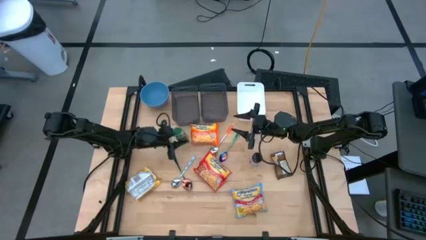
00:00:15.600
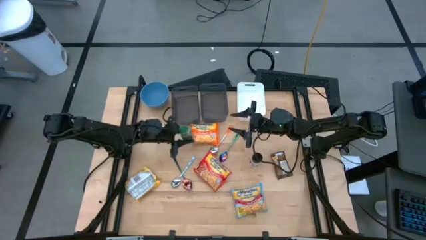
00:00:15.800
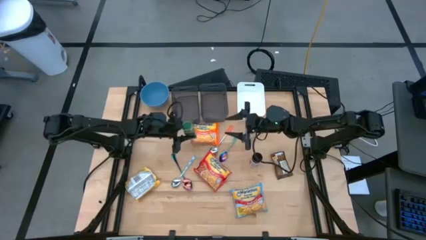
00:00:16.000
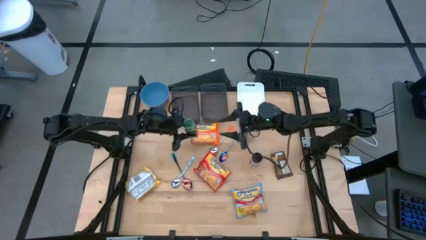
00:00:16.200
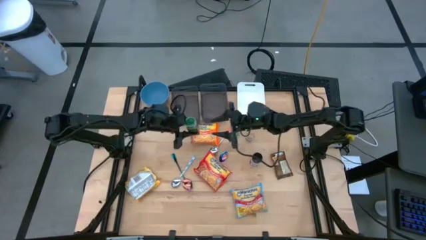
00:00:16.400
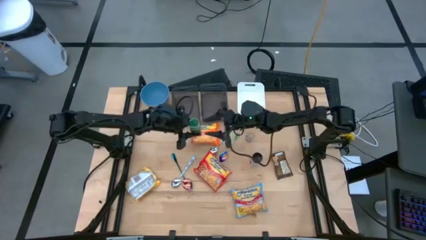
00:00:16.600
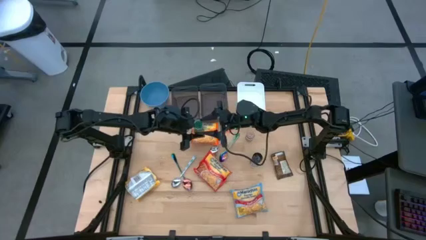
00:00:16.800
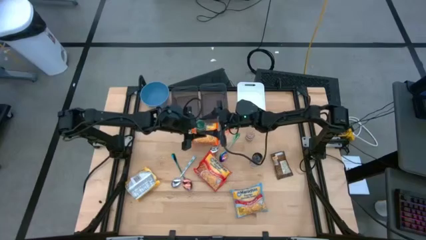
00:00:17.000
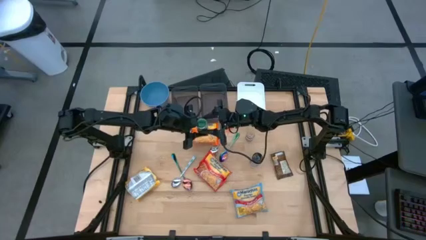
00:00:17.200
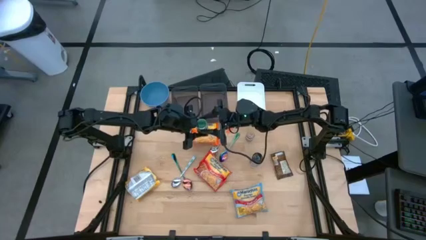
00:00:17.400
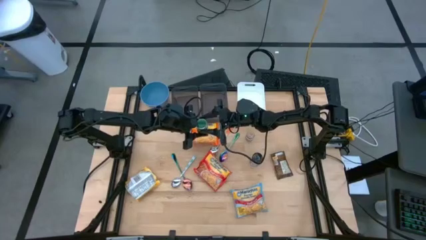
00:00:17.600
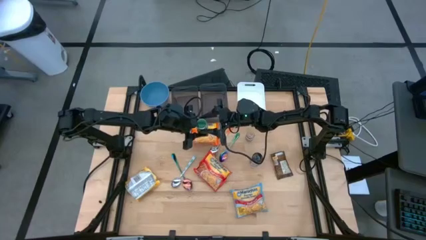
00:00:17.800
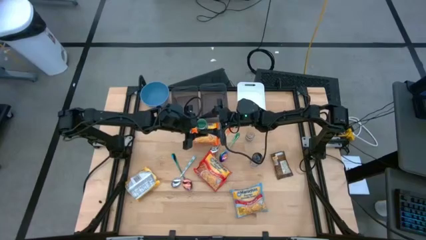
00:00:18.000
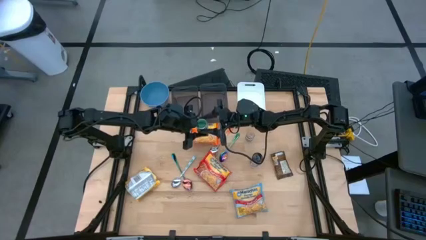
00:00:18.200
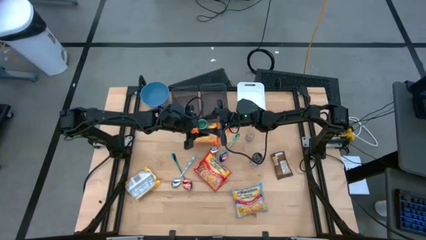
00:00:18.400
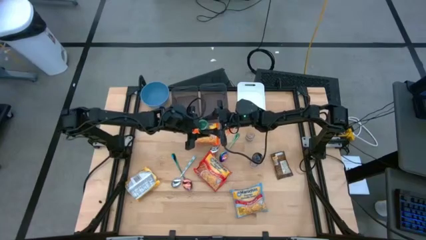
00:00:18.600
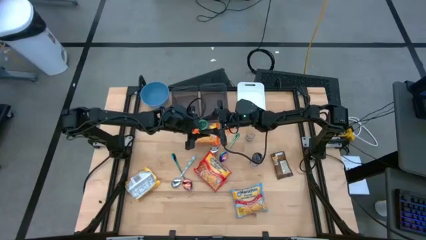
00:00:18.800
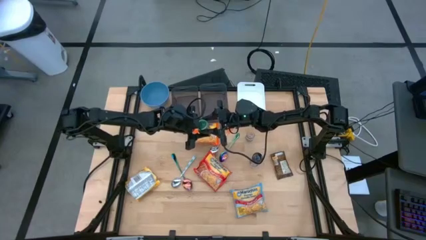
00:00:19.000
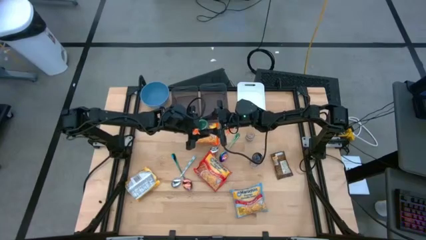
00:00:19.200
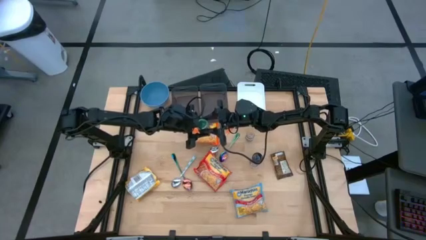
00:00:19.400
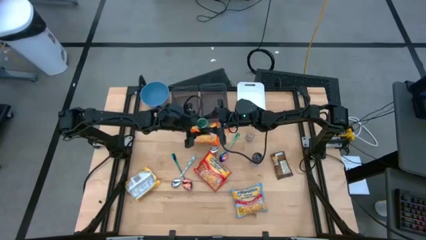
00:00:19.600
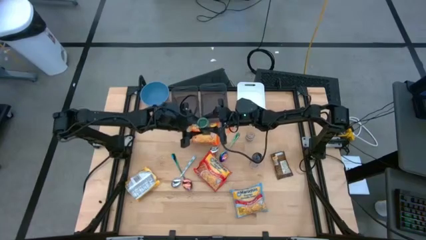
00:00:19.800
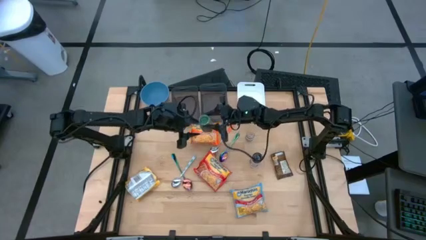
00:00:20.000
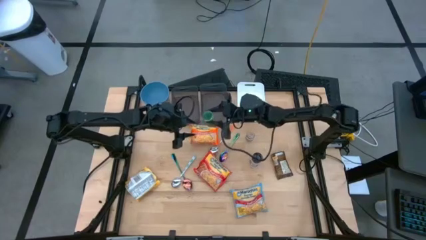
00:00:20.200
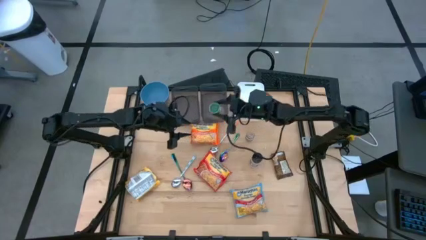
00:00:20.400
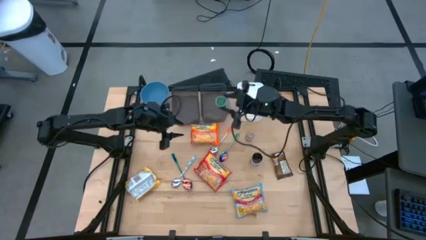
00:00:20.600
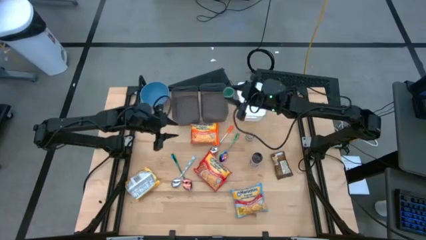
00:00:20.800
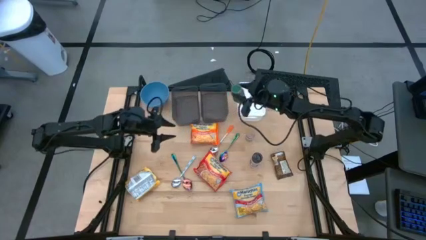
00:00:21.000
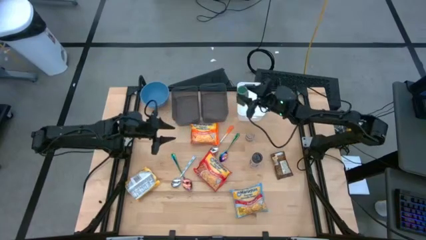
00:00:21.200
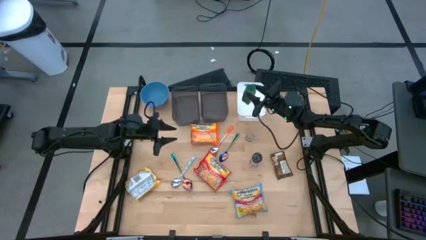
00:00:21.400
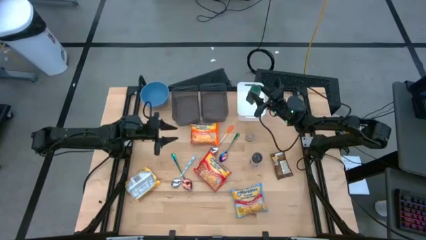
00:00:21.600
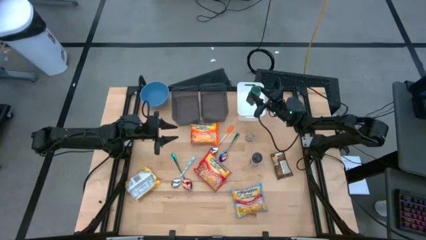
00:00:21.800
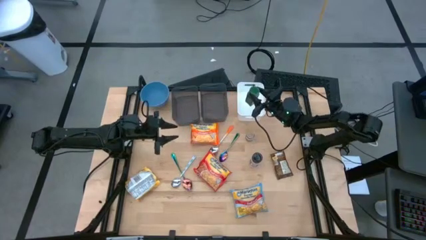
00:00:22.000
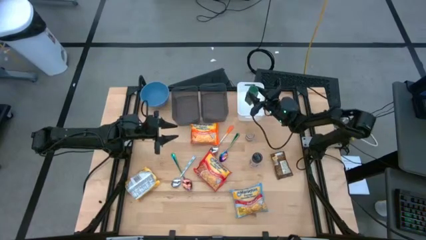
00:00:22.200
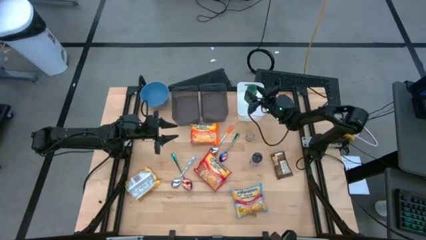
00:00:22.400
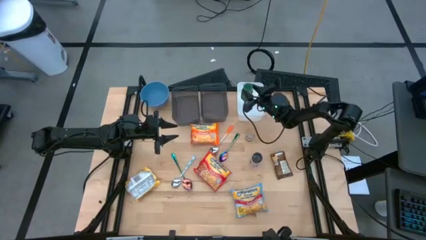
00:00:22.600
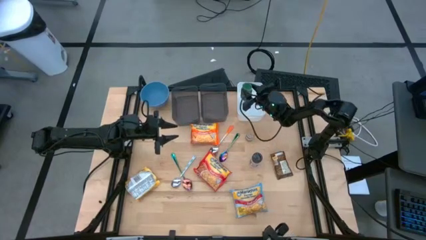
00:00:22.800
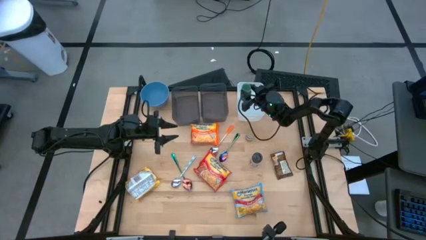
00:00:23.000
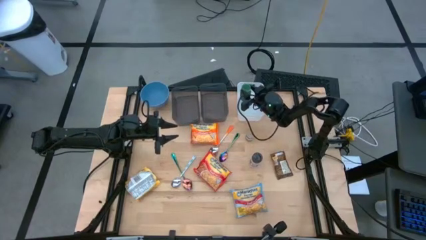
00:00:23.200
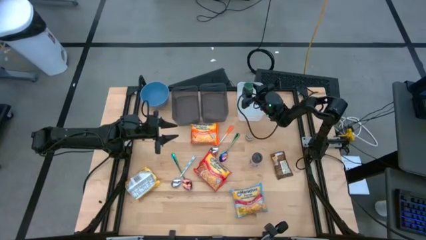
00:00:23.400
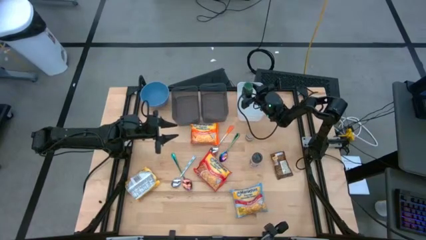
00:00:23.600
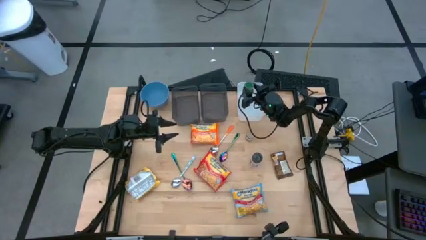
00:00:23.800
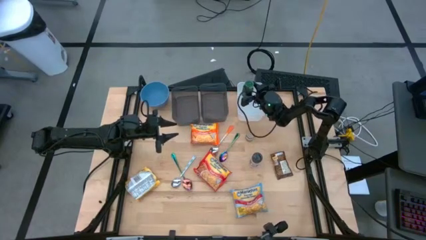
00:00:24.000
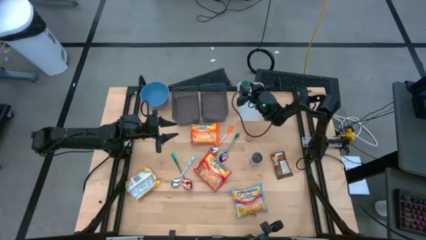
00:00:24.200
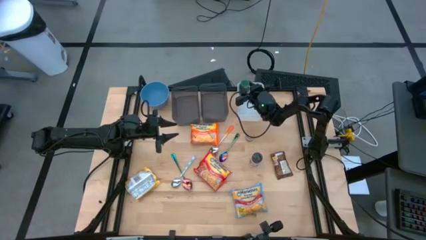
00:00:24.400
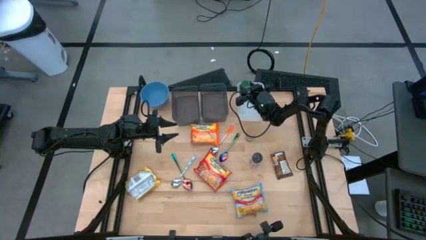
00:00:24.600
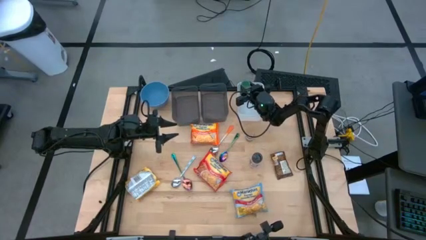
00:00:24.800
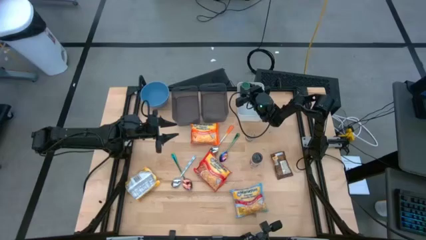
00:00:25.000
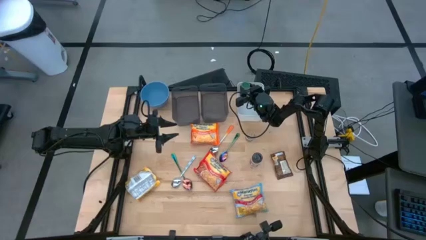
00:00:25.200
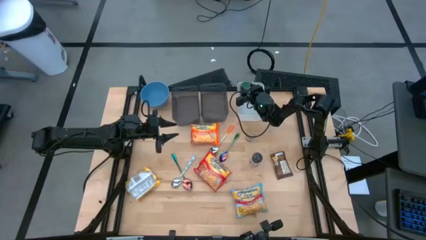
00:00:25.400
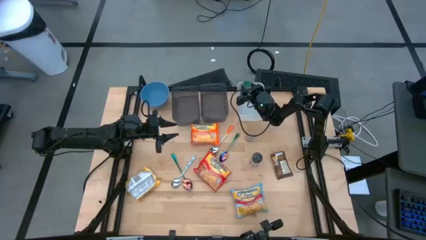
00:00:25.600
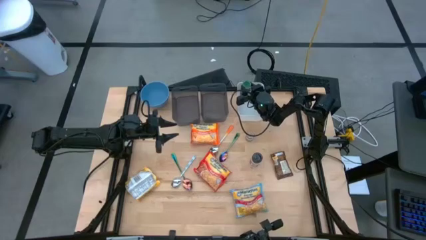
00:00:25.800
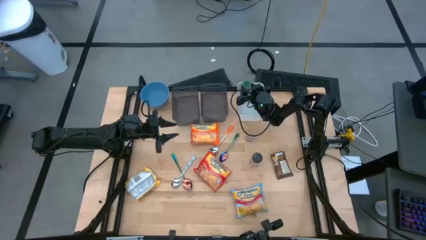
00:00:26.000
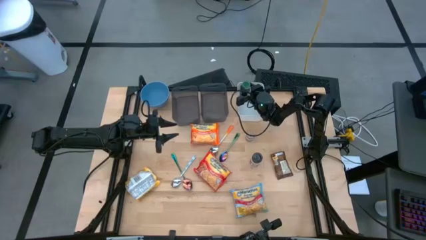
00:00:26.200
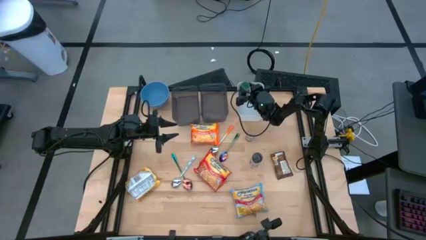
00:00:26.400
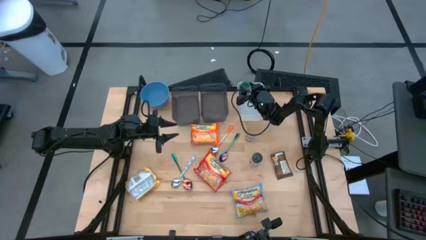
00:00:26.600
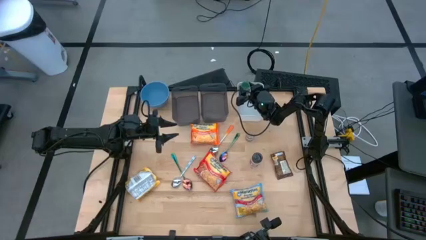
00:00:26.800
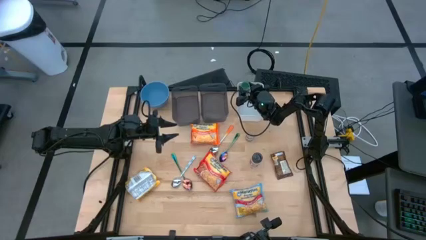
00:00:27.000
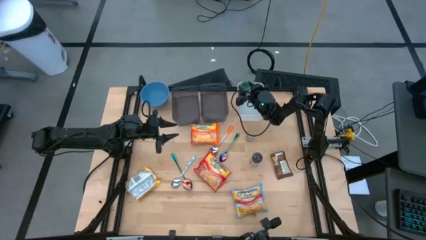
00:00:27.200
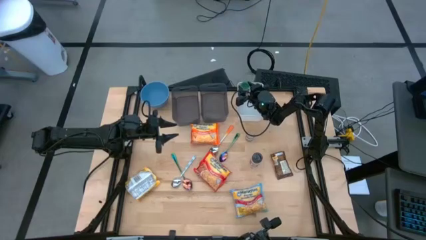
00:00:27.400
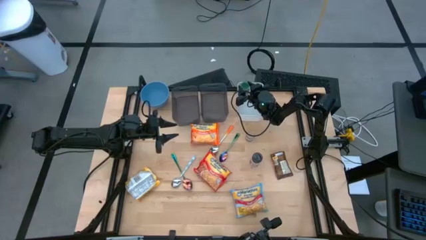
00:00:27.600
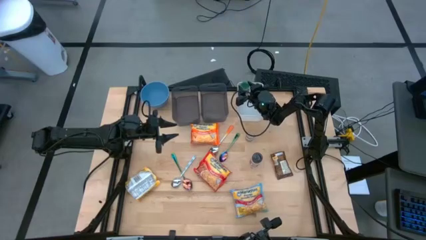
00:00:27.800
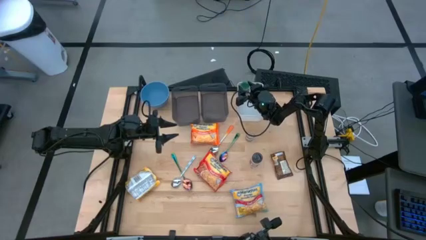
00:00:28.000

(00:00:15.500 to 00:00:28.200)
Task: Pick & Place Food Item
Put the green seasoning bottle into the white bin
